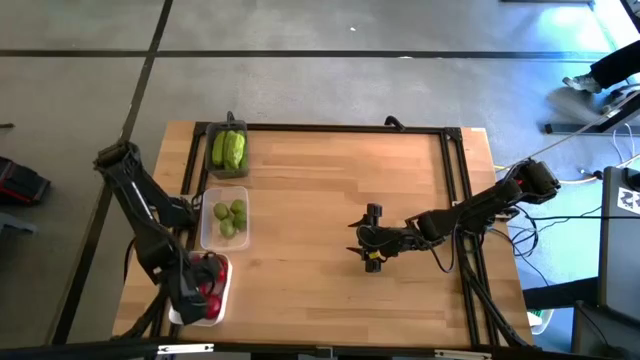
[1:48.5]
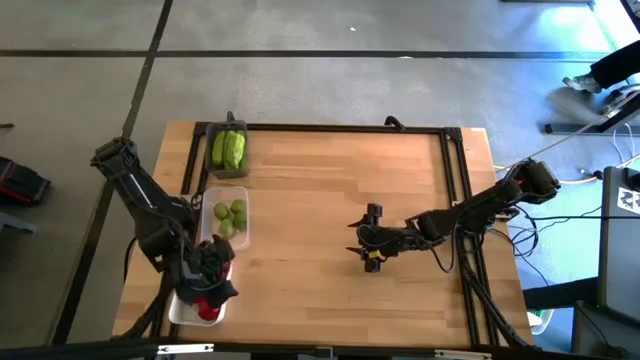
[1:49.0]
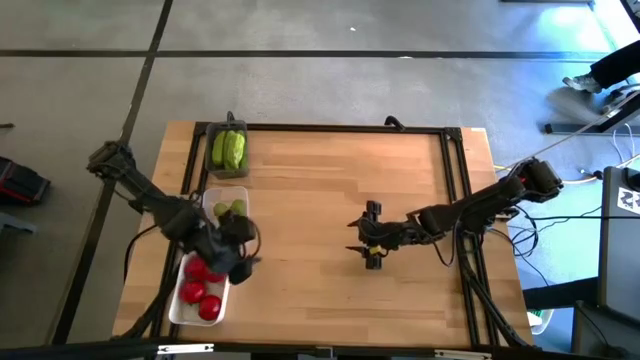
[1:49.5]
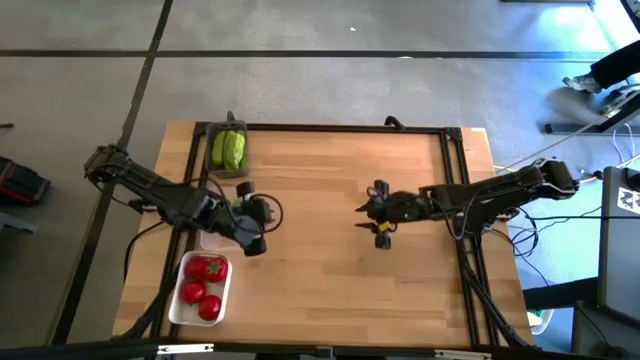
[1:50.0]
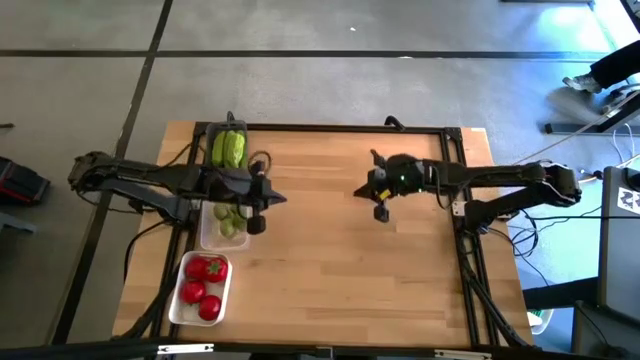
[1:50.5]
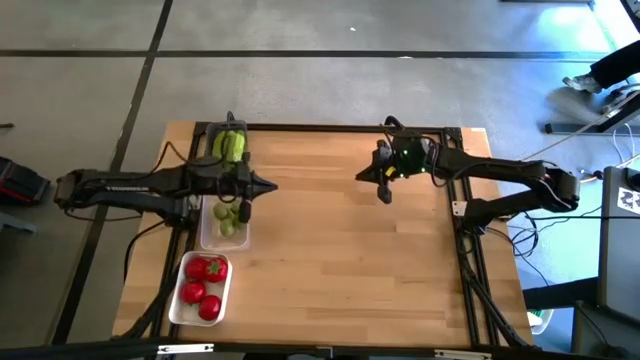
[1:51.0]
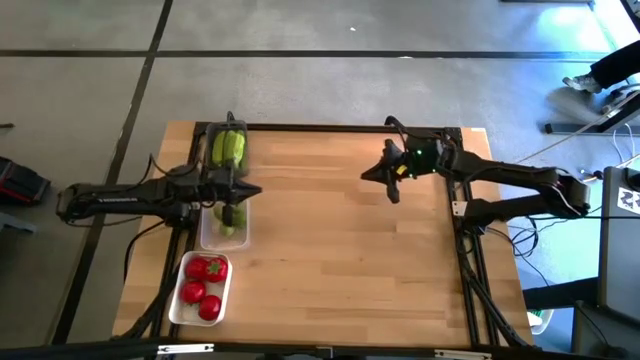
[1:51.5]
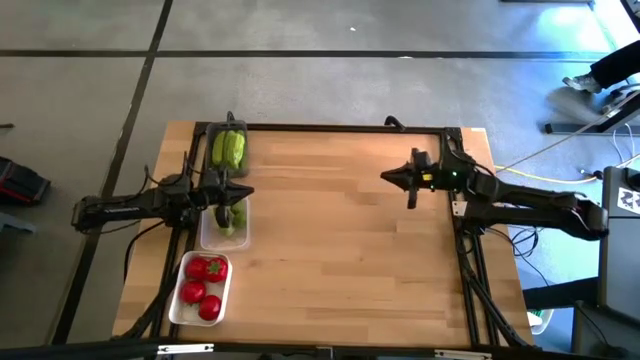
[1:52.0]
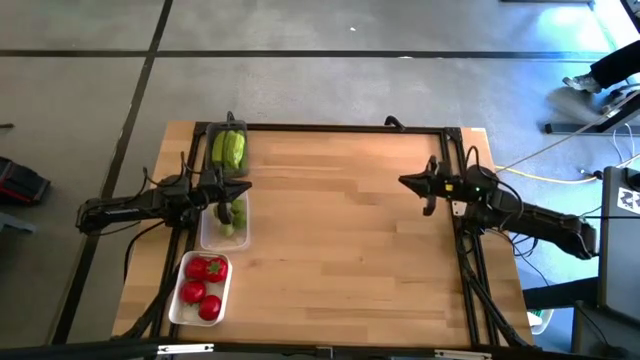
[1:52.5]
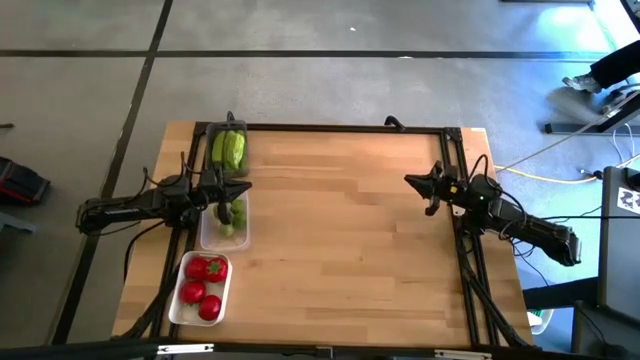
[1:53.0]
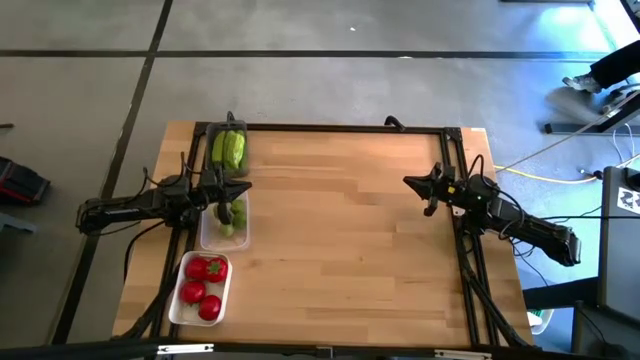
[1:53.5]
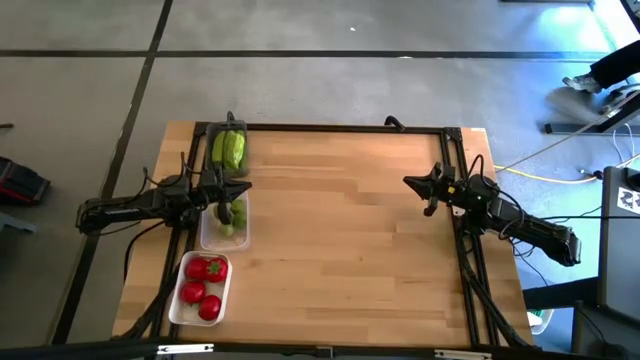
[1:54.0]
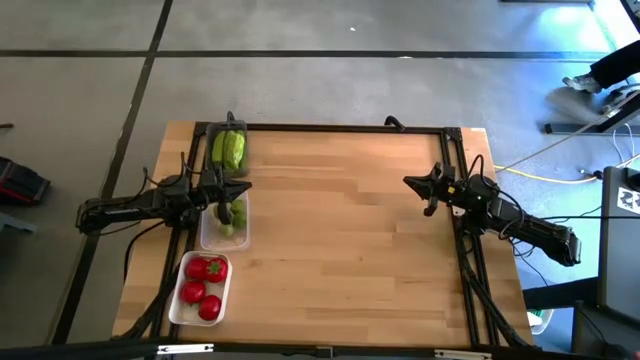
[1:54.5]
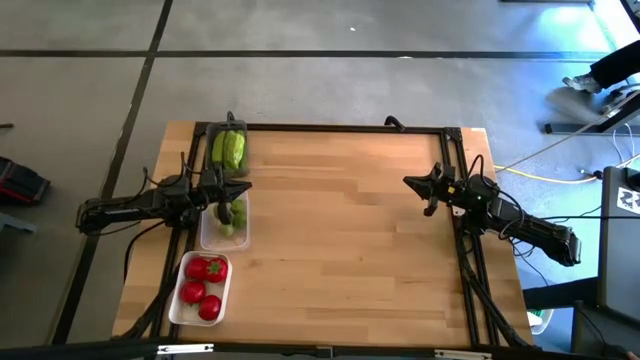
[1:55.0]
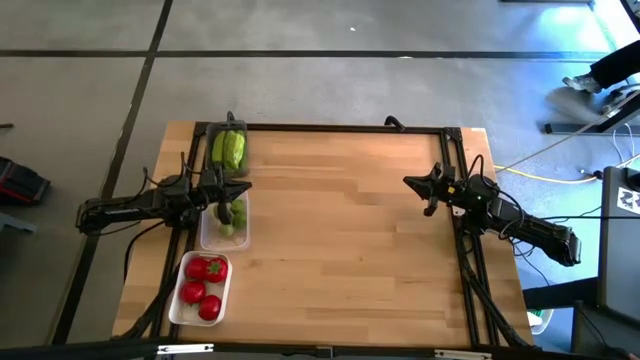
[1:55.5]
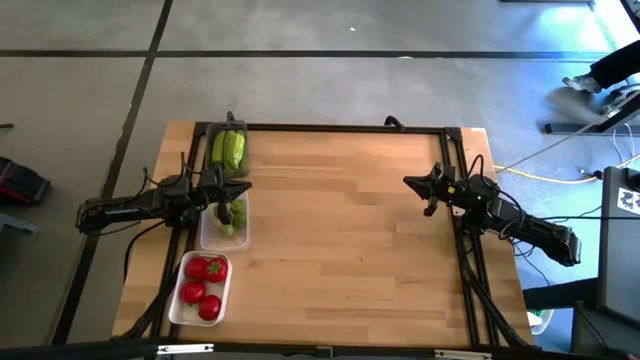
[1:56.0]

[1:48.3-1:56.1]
Task: Sort produce into baskets
Return to Home Position

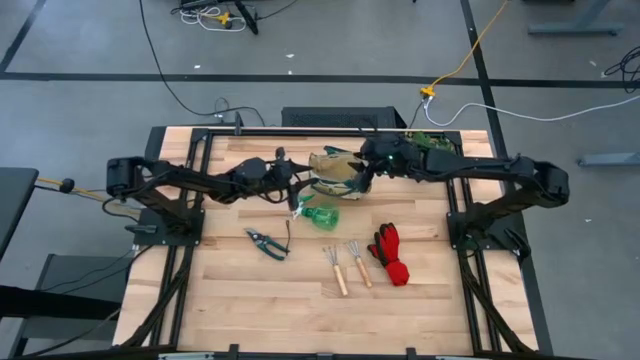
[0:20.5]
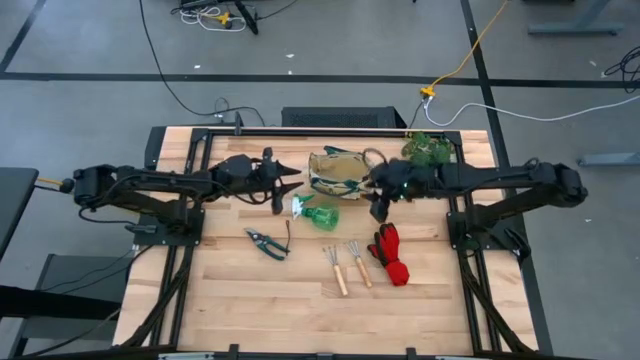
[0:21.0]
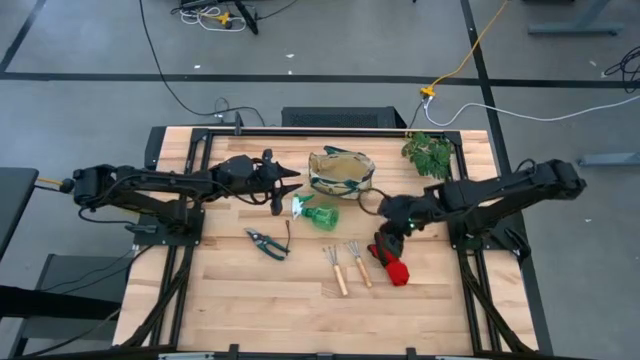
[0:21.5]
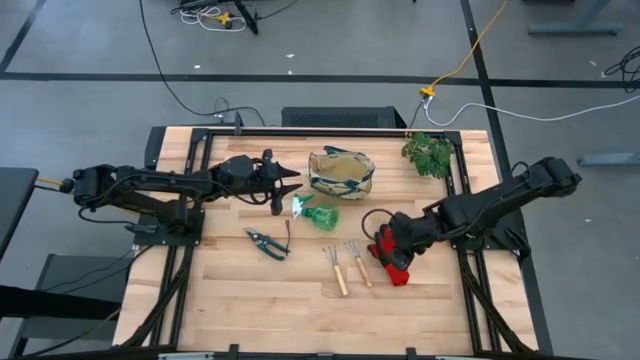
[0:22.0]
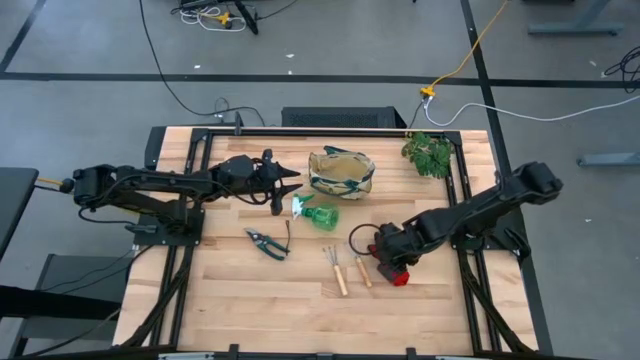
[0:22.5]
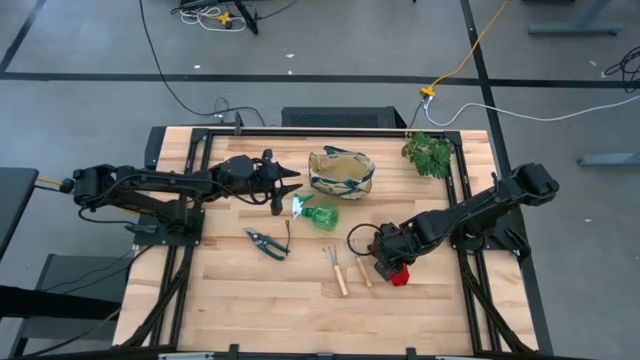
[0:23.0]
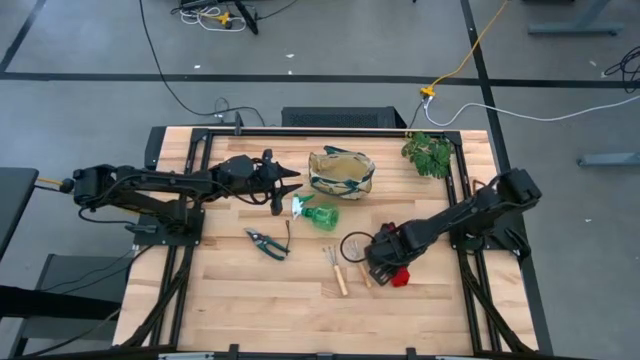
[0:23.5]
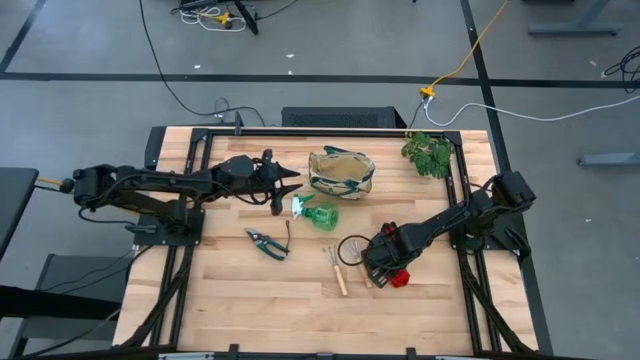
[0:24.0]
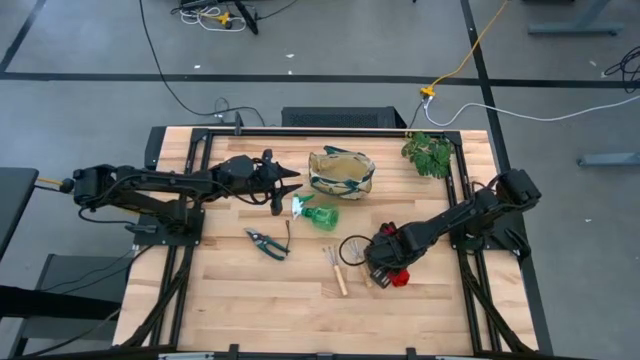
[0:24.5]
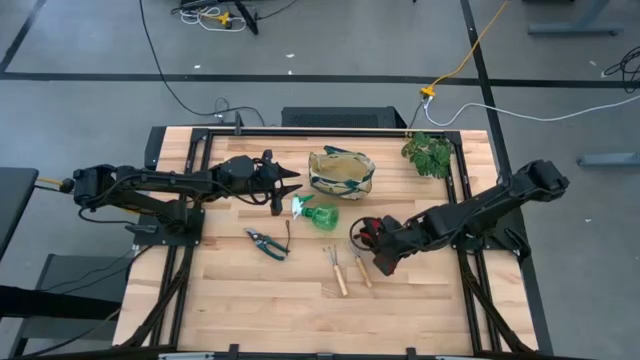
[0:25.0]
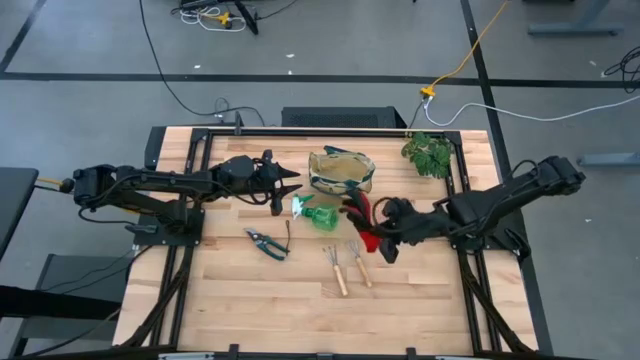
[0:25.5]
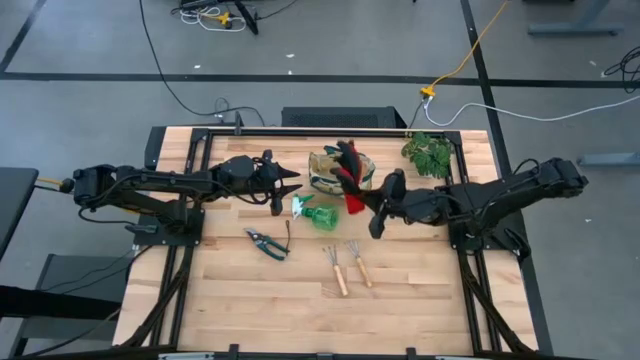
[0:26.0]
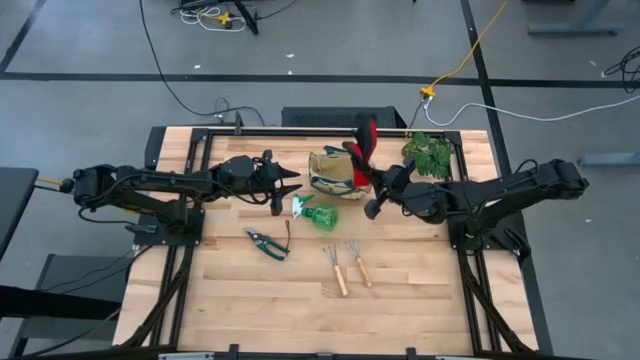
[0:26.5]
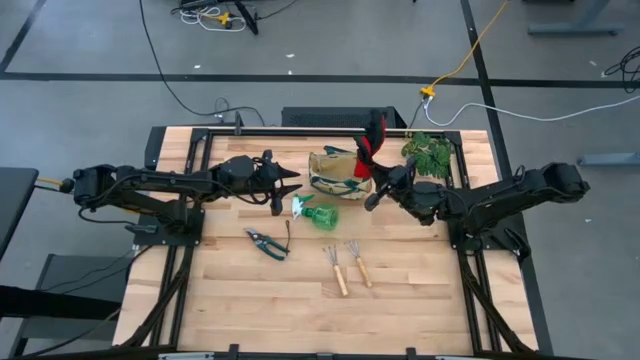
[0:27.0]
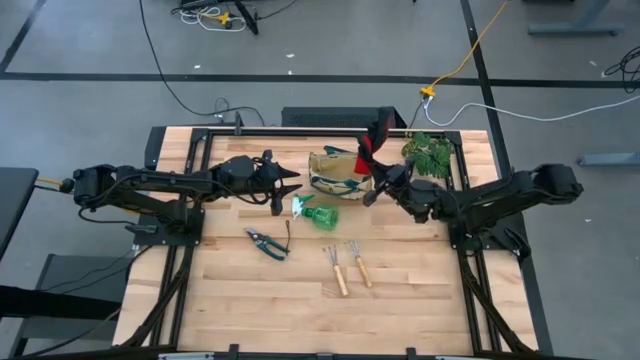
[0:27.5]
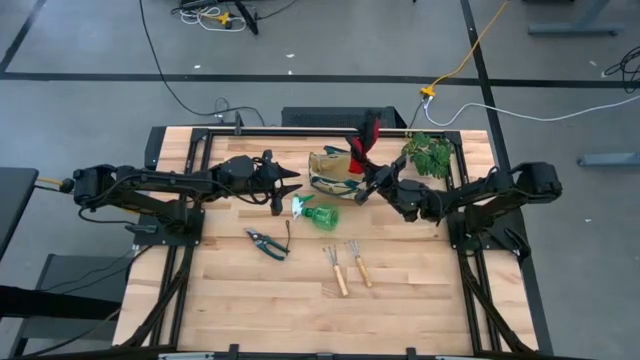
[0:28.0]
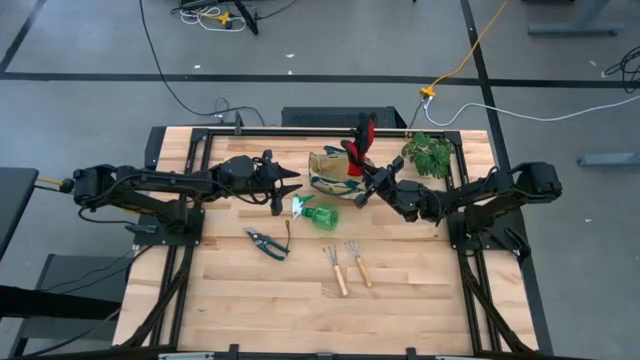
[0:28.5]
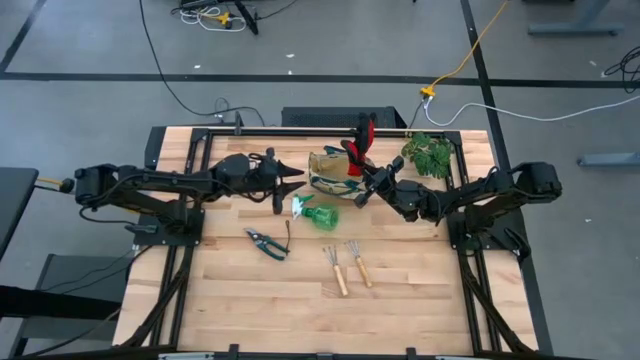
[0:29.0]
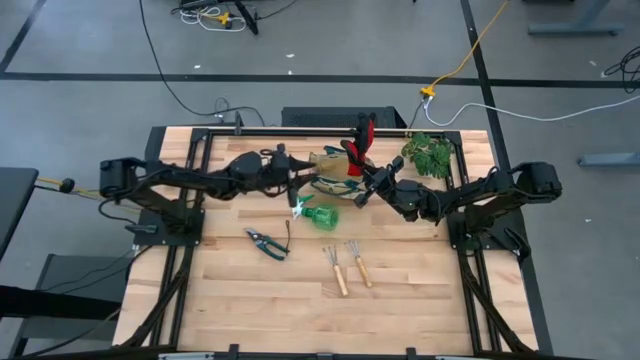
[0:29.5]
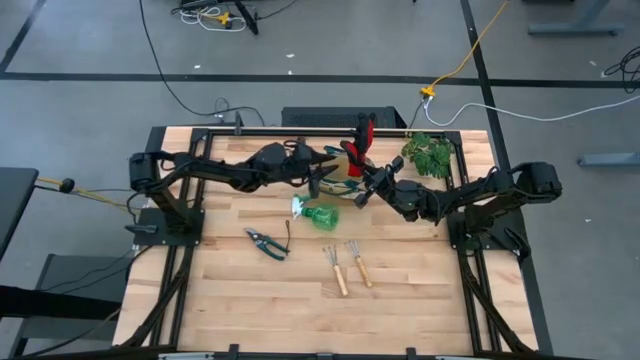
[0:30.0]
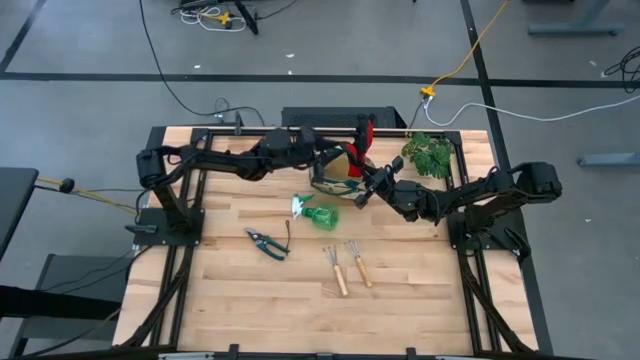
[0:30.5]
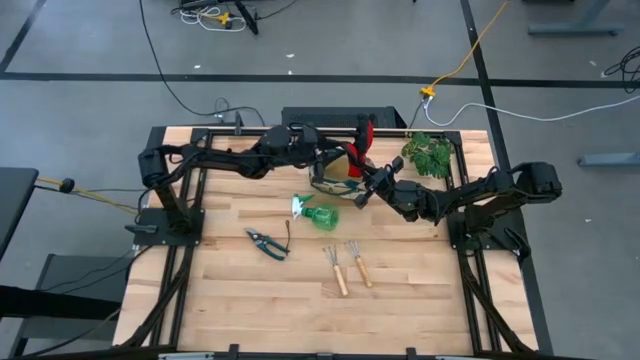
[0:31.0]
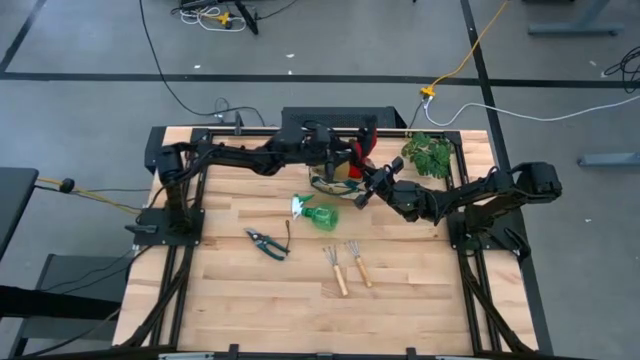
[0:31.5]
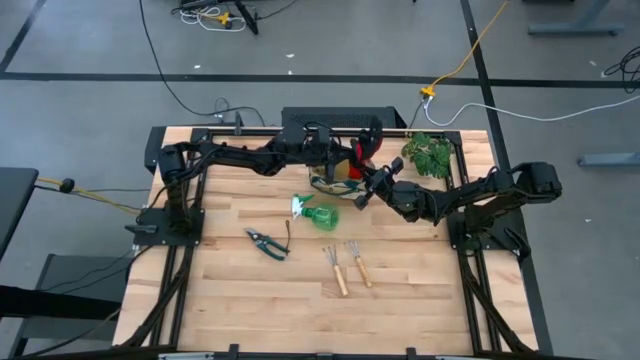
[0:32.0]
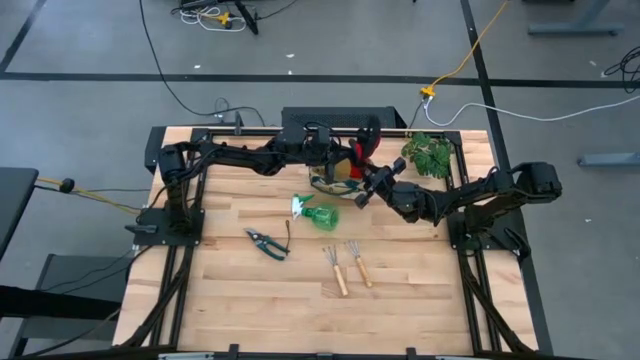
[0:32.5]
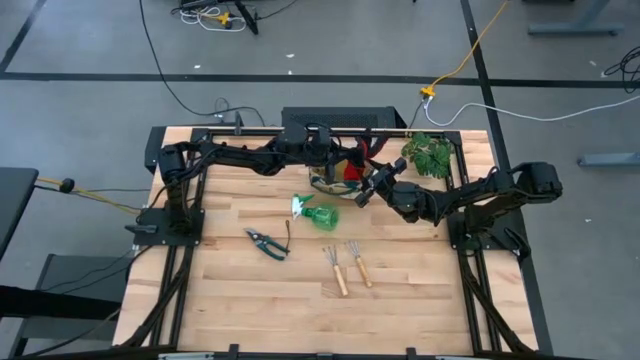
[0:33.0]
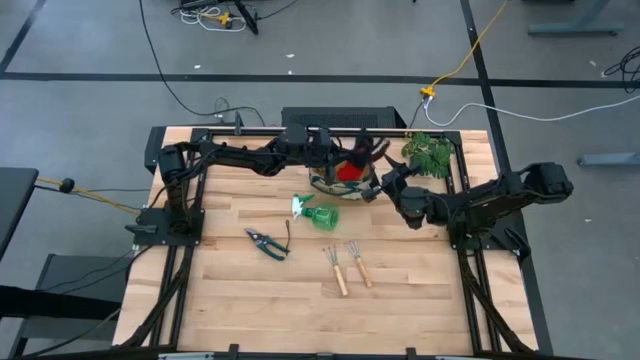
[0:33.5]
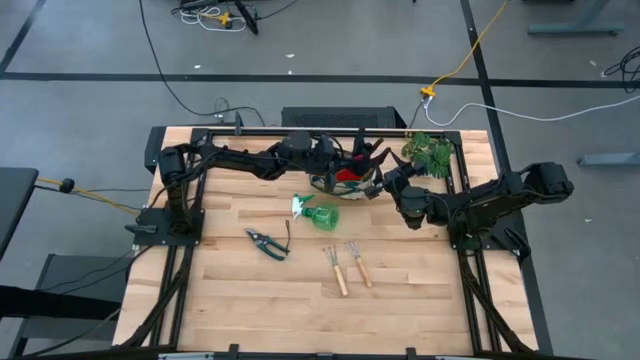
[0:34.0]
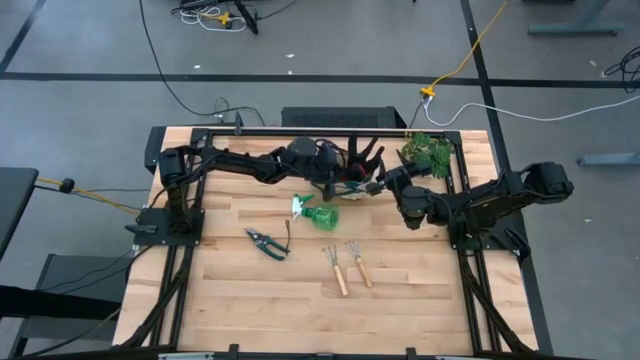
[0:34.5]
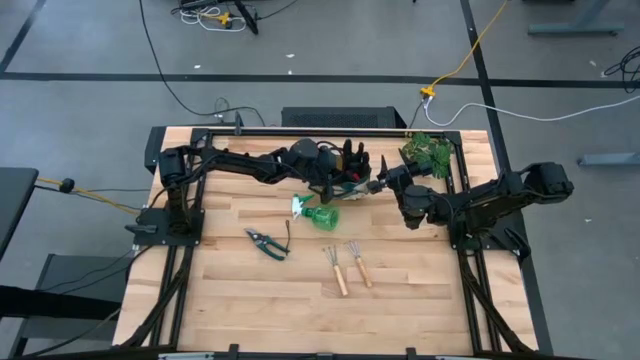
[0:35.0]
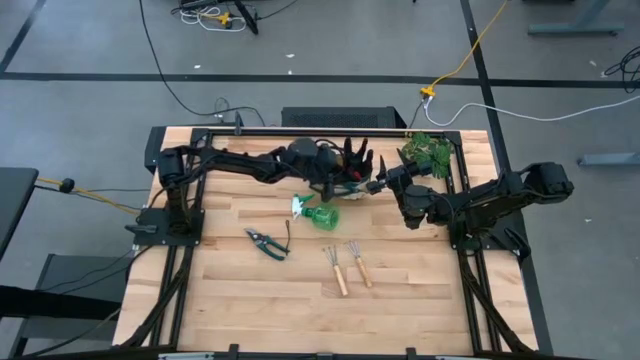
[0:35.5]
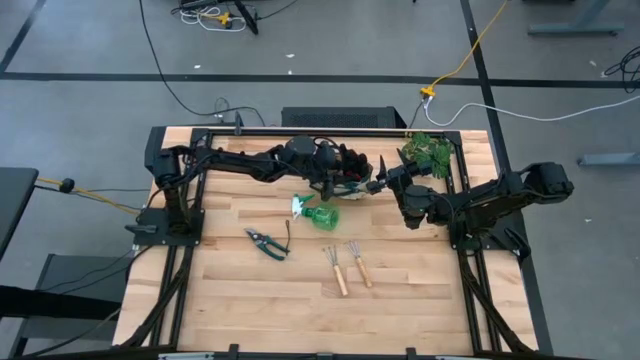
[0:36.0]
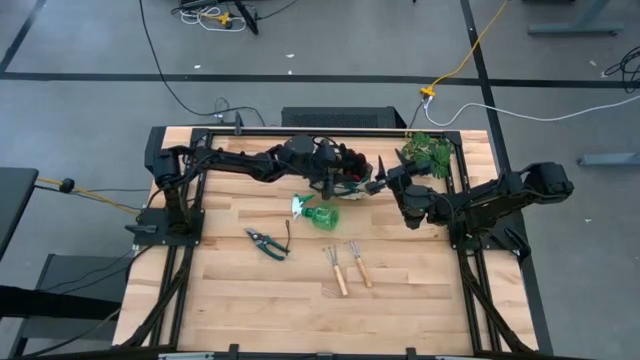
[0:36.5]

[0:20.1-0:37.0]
Task: Pick & Place Garden tools in Gardening bag
Put the red pair of gloves into the tool bag
